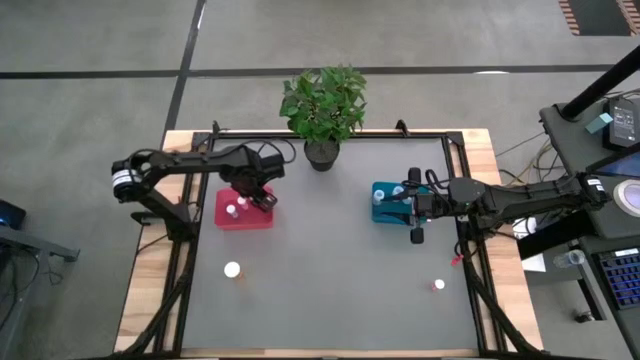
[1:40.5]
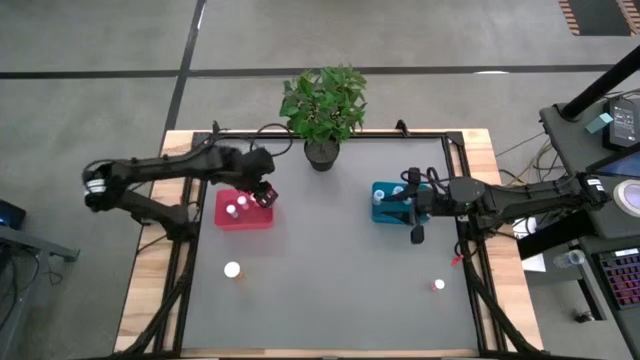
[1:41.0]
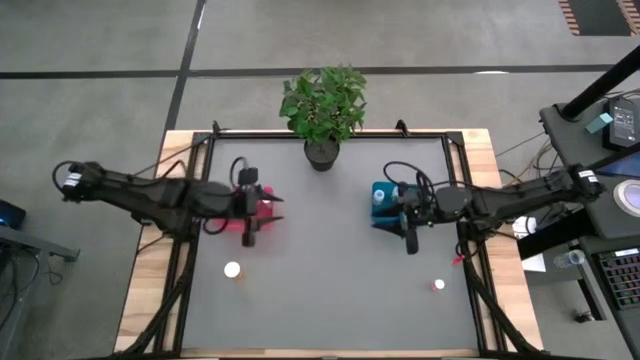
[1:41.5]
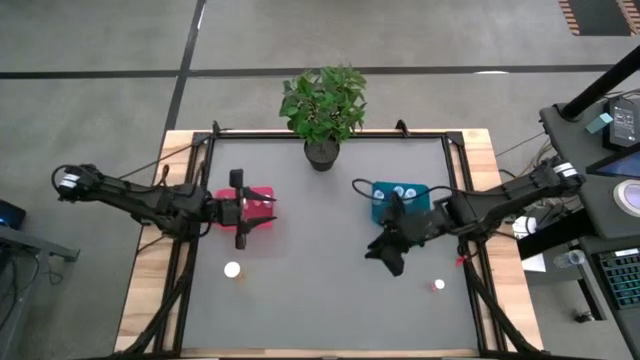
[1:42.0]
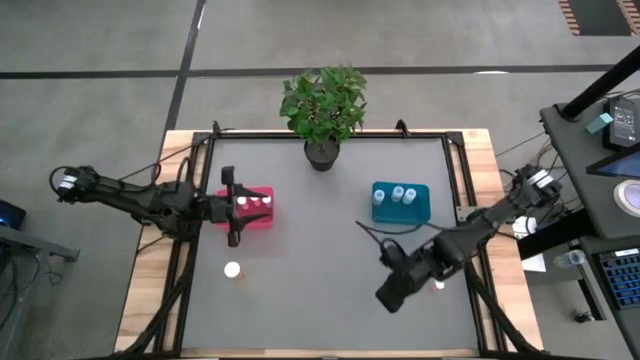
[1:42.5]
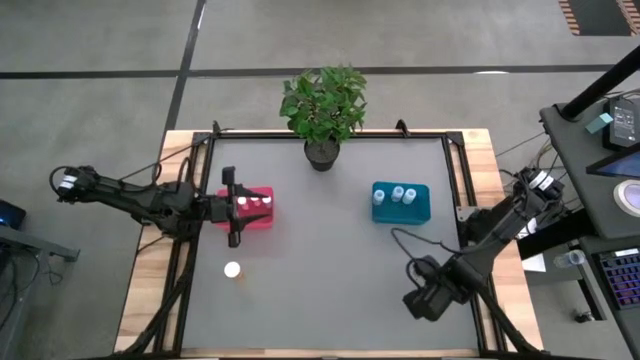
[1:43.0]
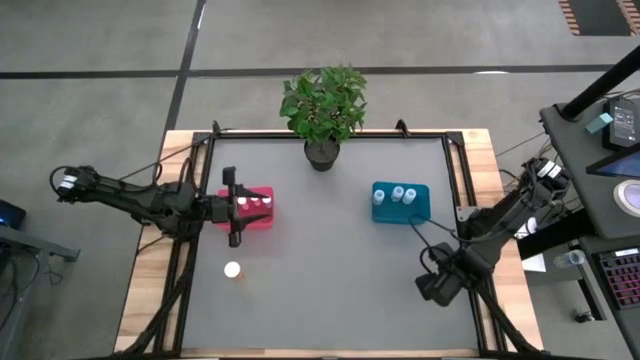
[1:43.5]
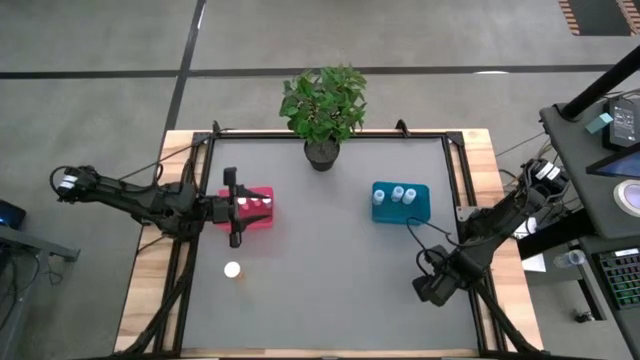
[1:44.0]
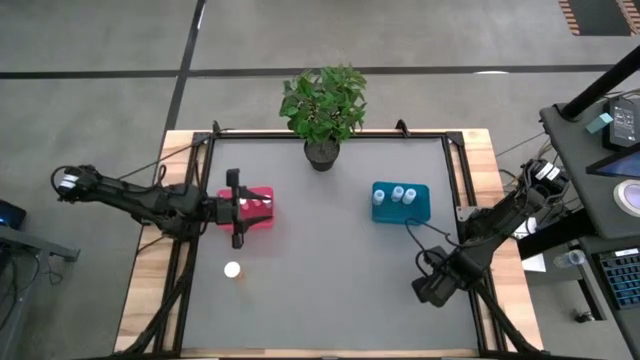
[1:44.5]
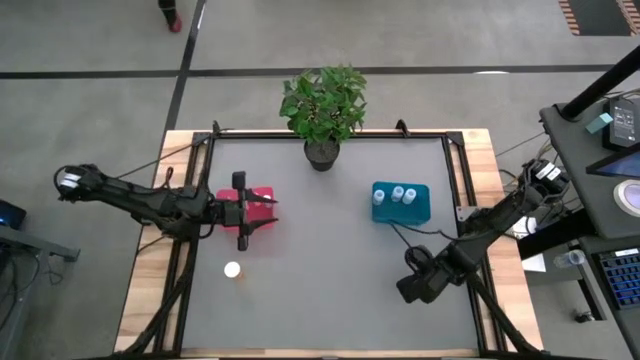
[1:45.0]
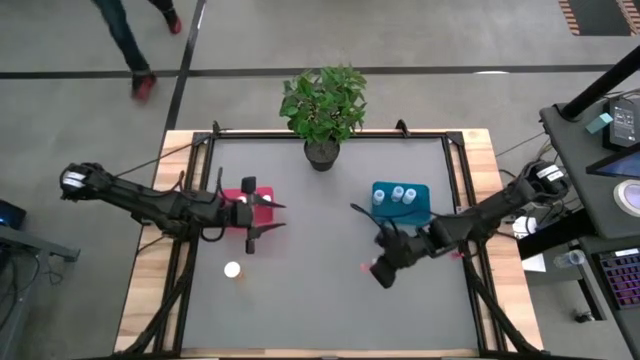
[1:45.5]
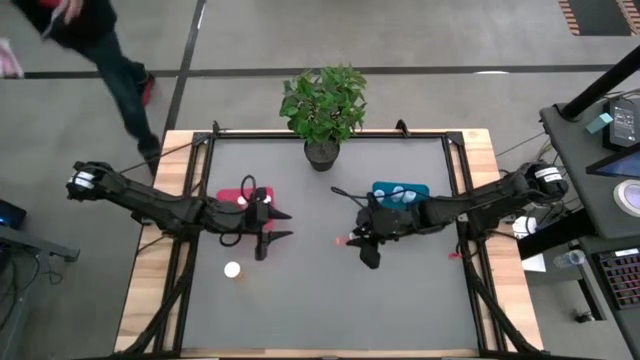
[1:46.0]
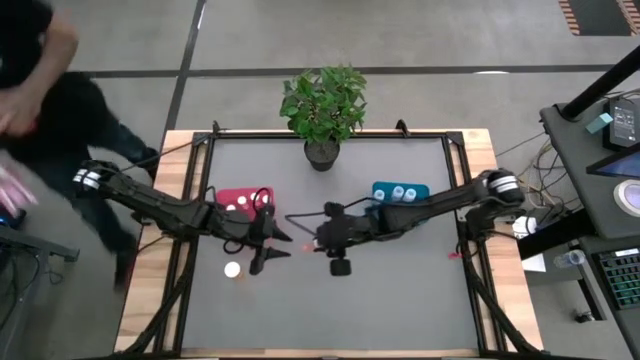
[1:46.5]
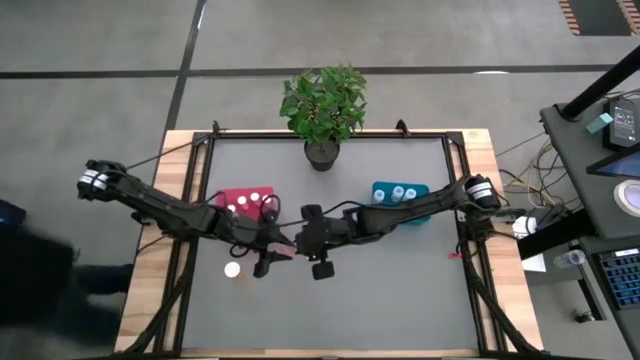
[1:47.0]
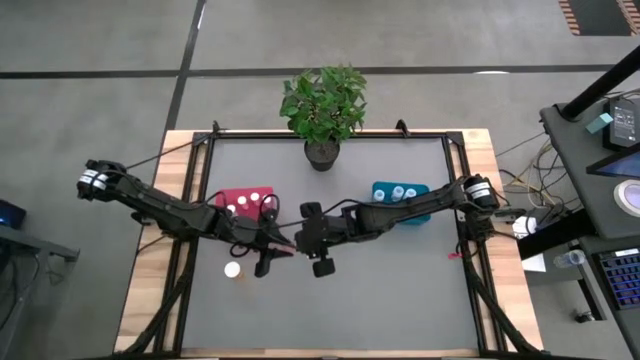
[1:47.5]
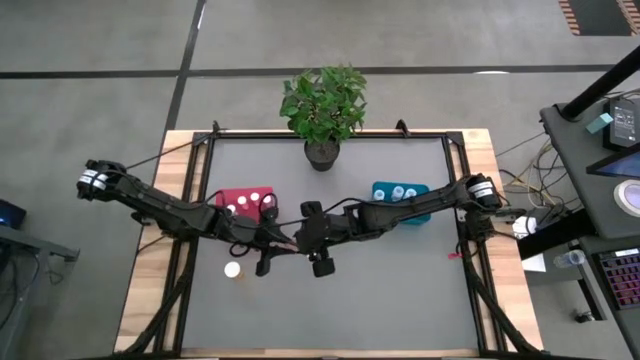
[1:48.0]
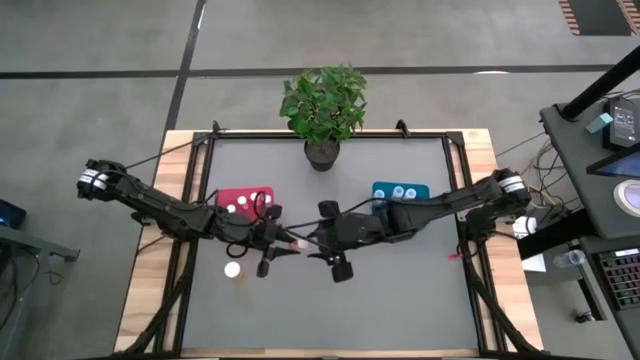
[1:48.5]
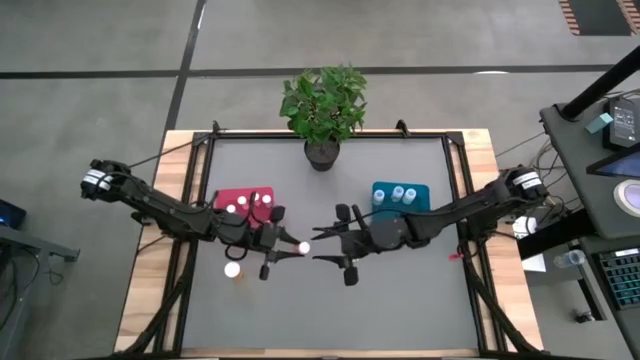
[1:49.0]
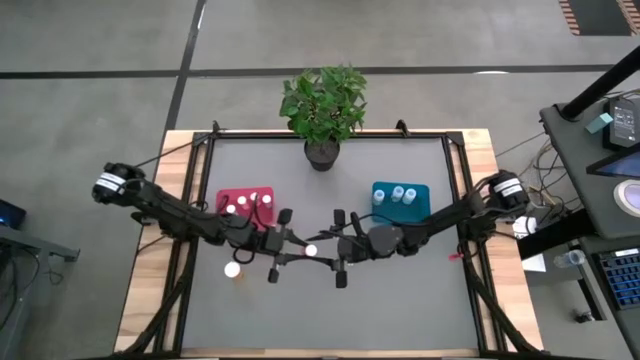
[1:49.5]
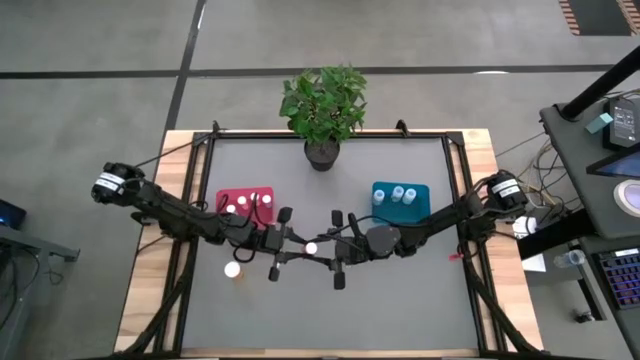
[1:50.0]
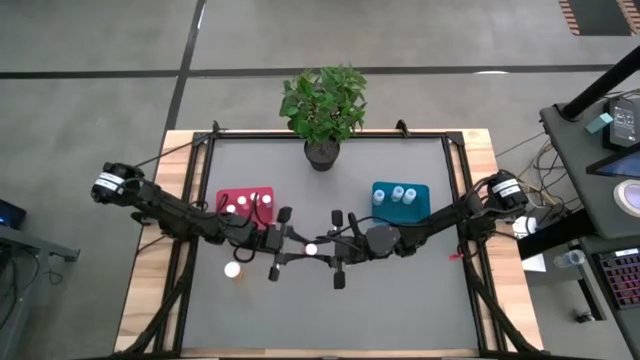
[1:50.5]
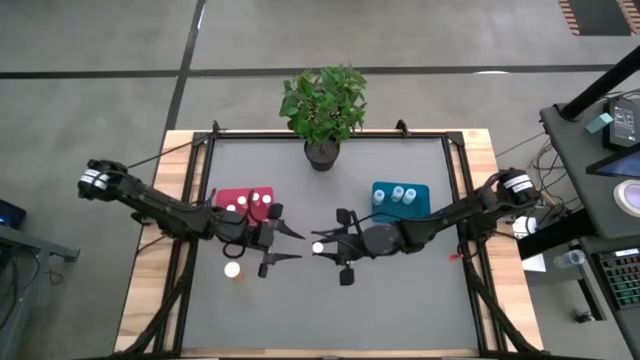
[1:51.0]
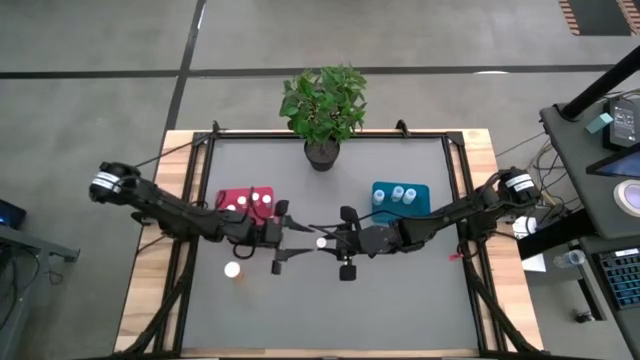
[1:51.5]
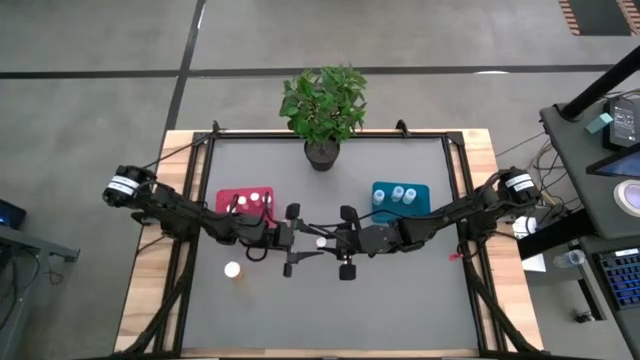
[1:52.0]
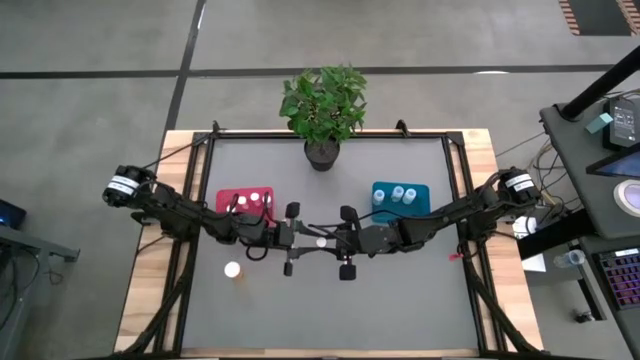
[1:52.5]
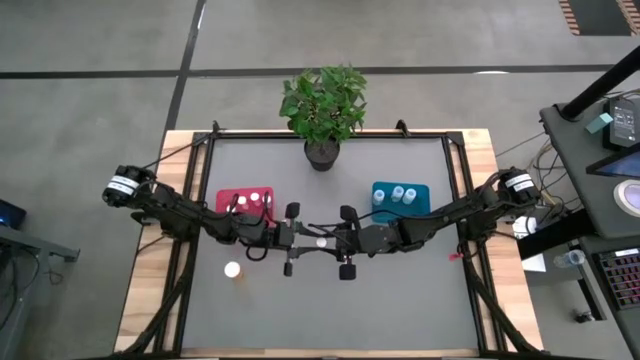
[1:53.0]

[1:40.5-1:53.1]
Task: Pick and place medicine bottles into bin by pill shape (circle, oval)
Put the orange table bottle into the red bin

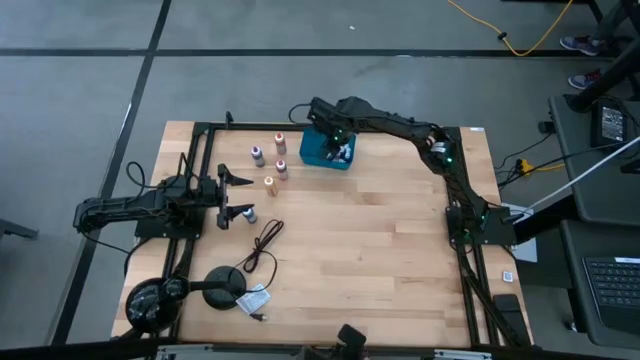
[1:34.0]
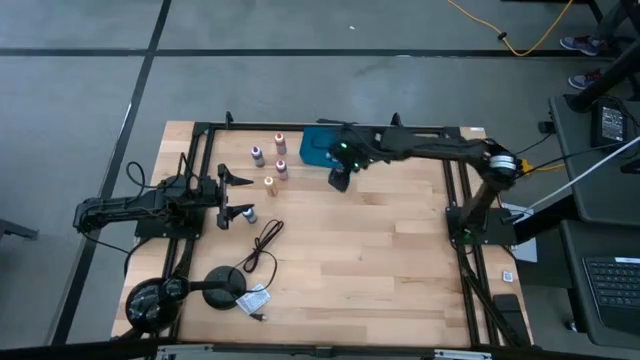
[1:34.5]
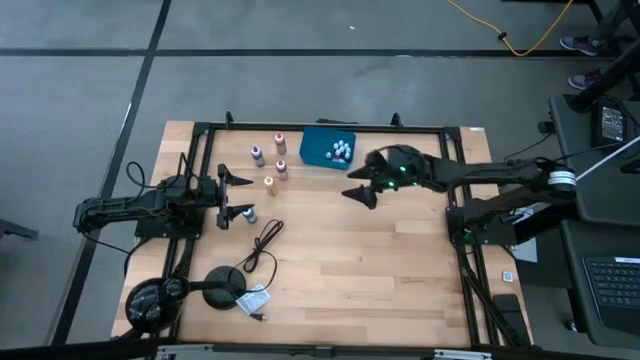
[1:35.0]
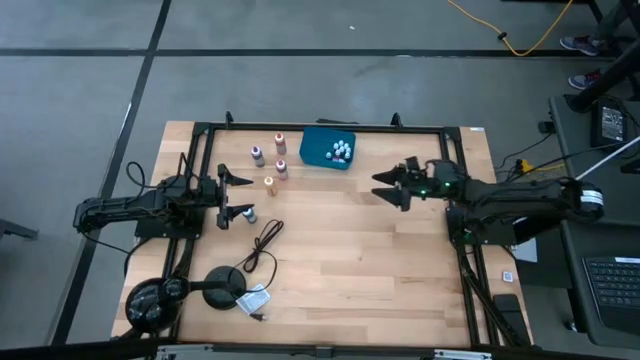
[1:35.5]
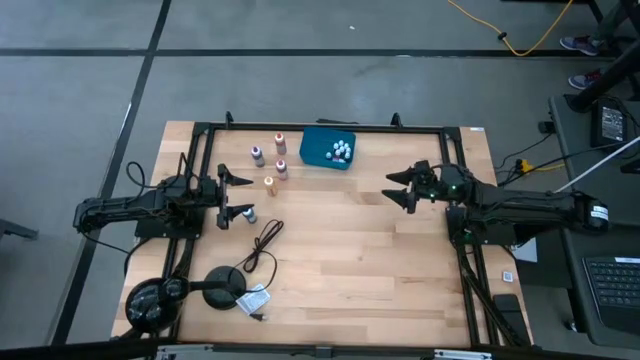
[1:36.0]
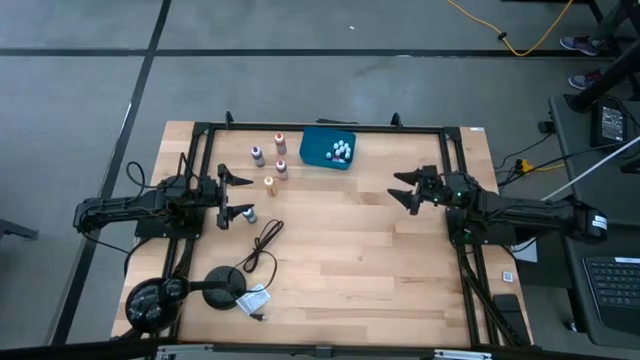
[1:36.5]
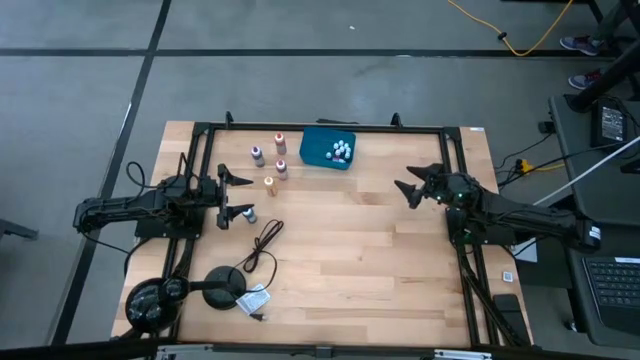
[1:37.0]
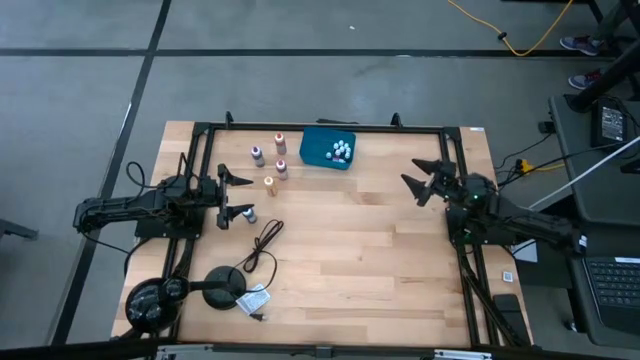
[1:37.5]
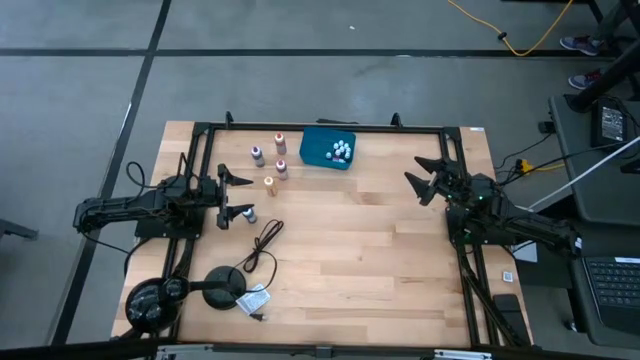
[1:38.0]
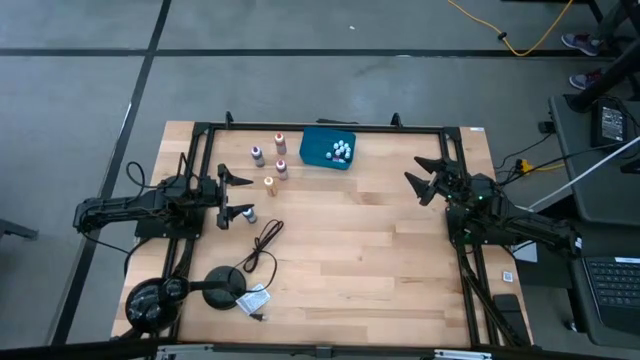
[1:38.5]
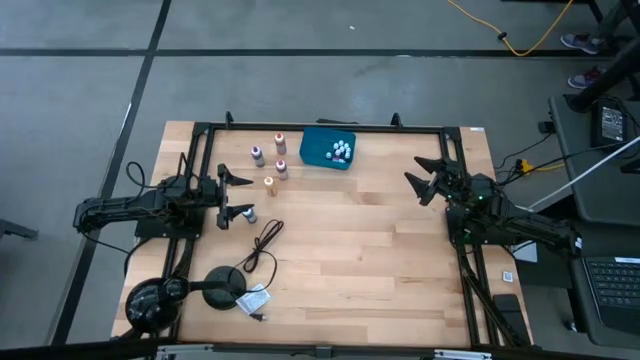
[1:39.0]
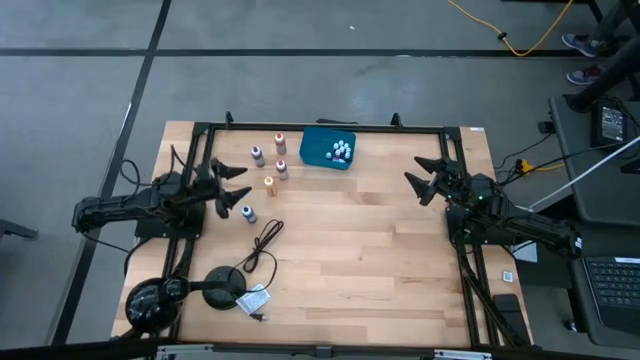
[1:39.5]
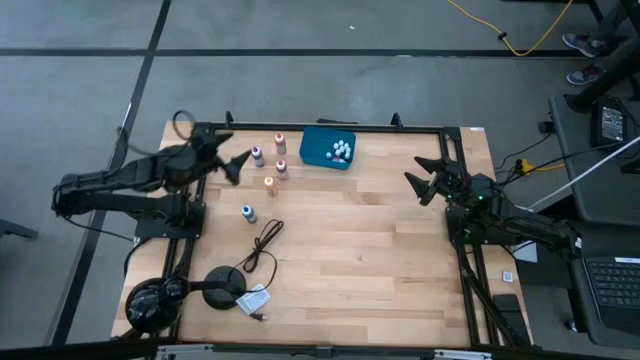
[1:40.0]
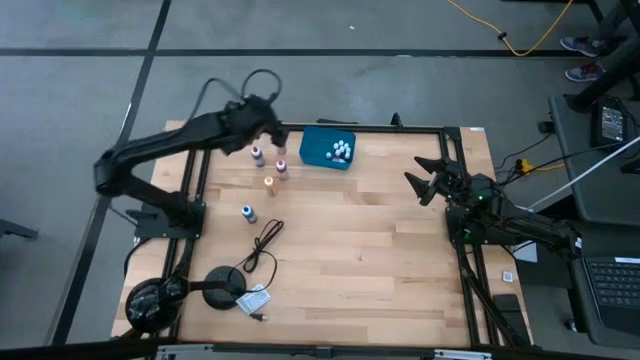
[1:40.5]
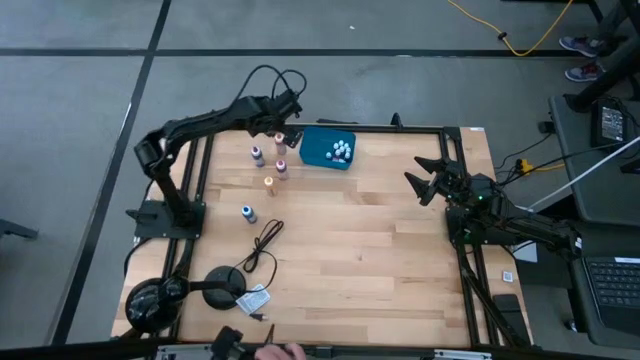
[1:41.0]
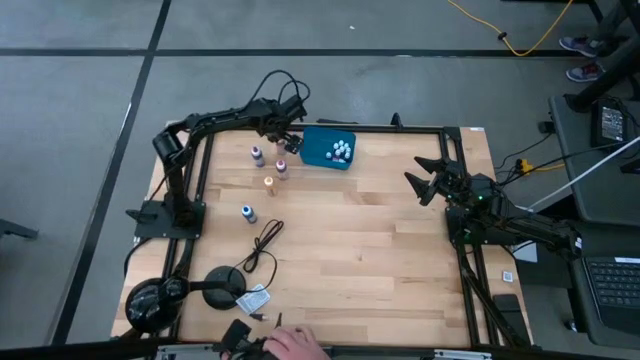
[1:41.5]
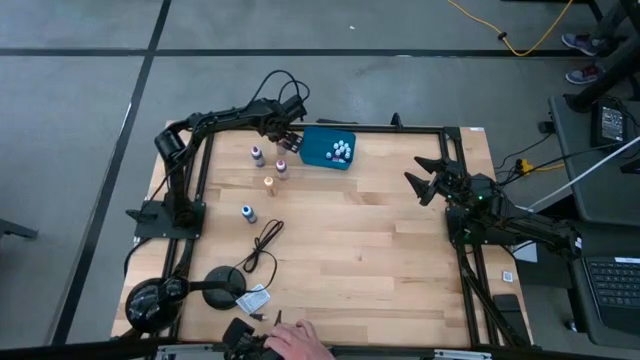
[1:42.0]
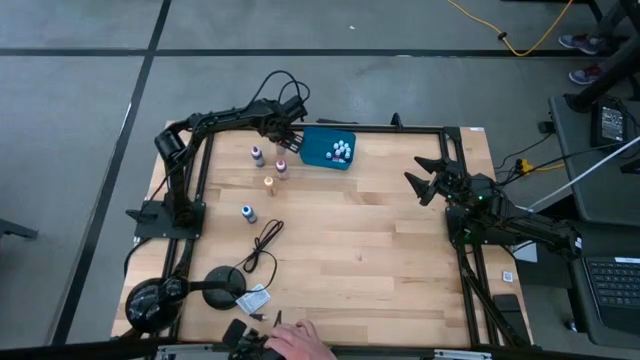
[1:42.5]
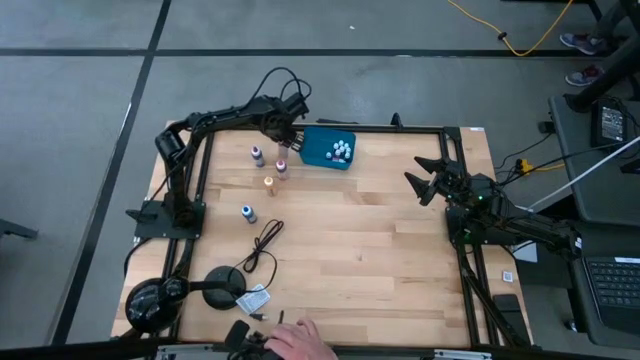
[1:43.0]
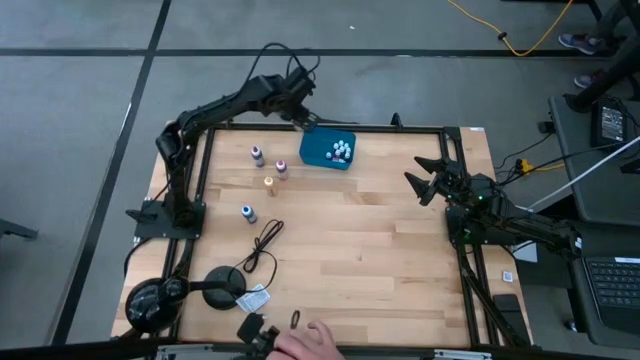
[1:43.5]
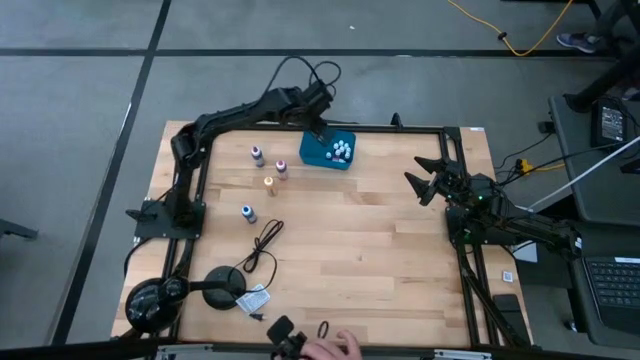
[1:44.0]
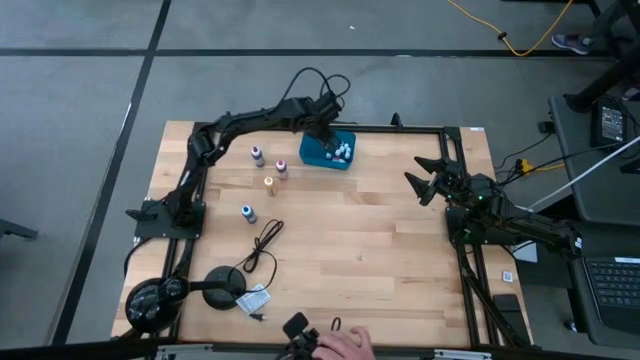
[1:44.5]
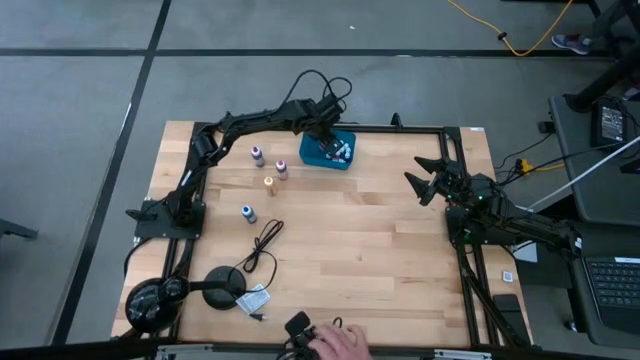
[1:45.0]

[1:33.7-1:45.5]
Task: Pick & Place food coloring
Put the large orange food coloring bottle into the blue container
